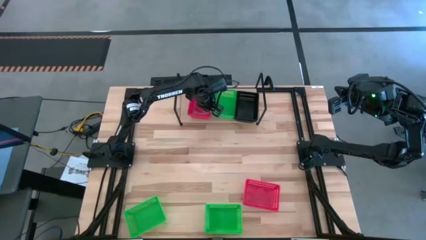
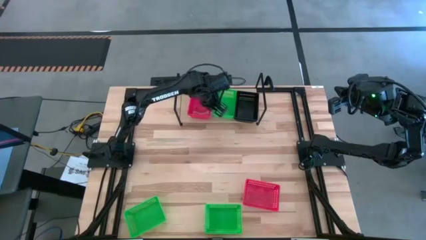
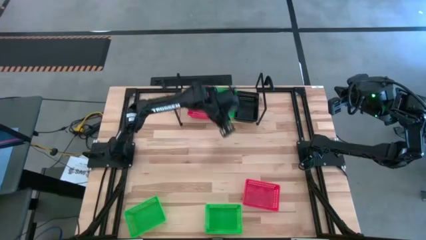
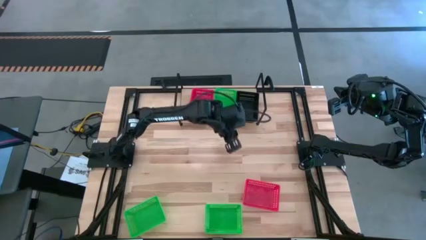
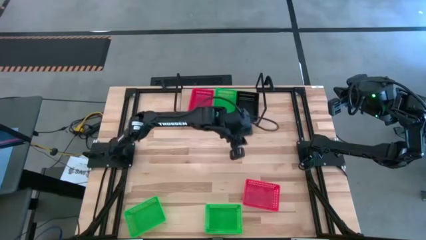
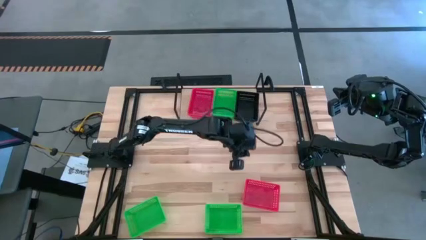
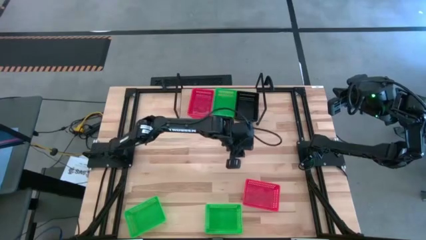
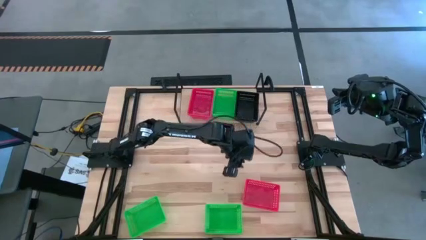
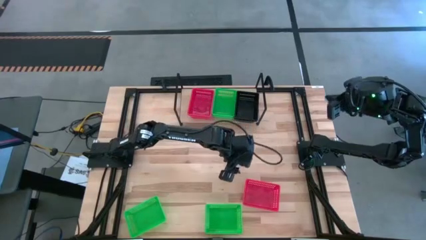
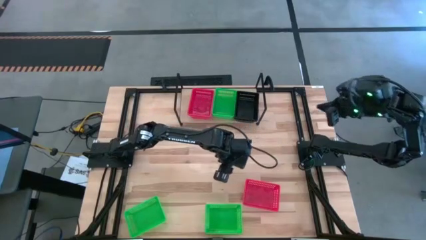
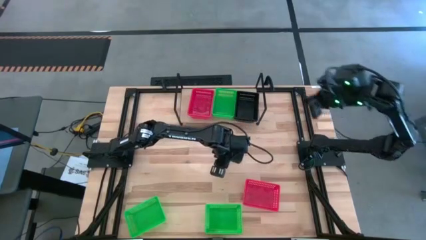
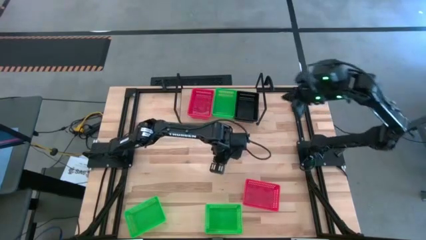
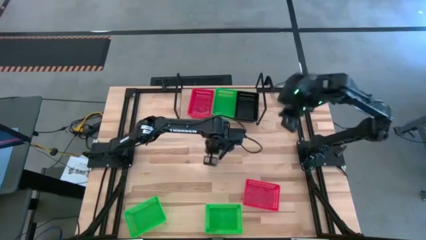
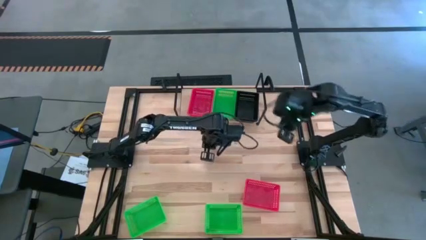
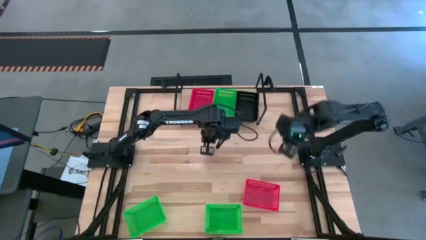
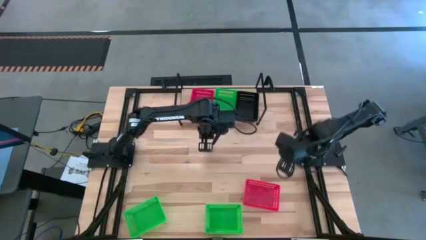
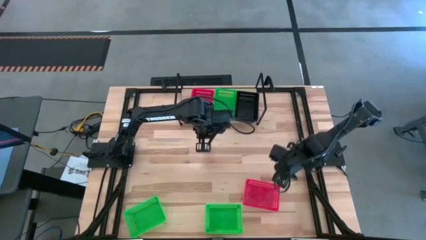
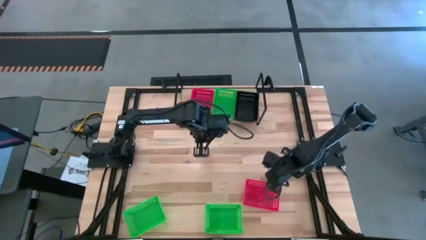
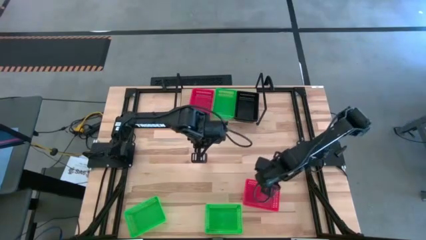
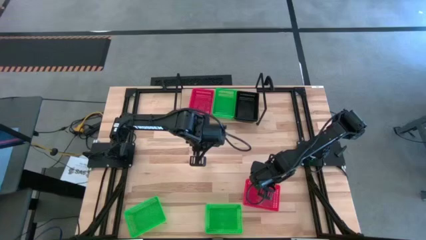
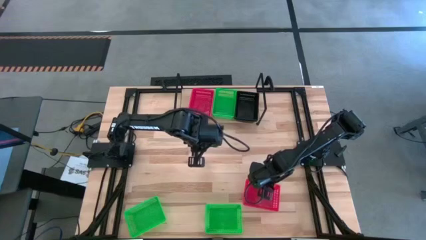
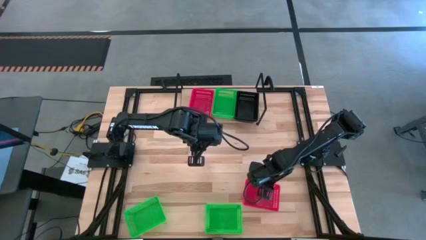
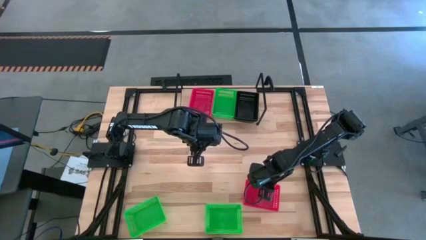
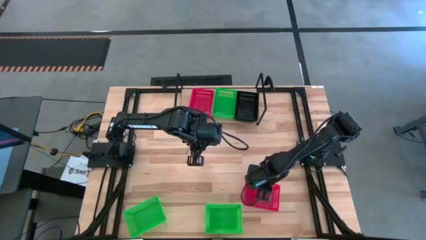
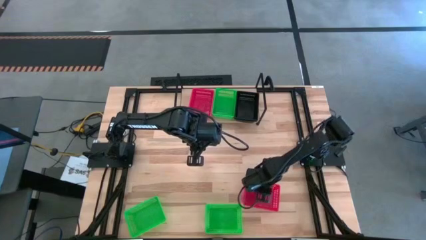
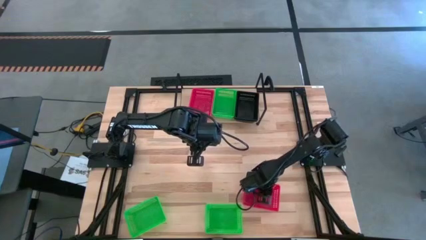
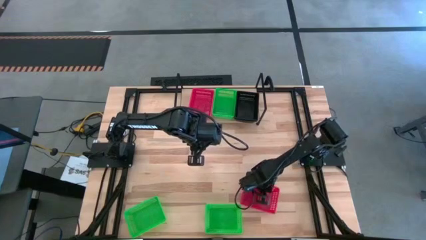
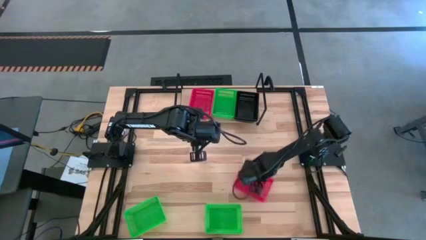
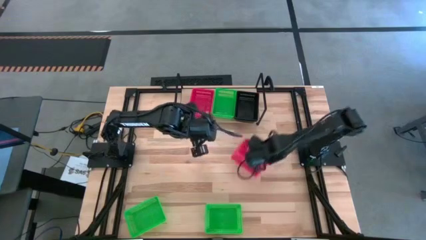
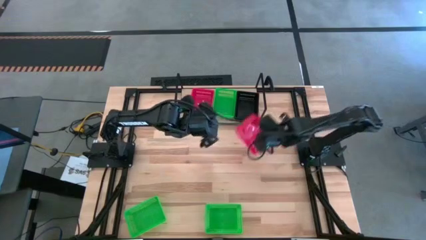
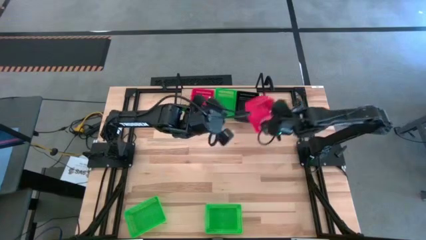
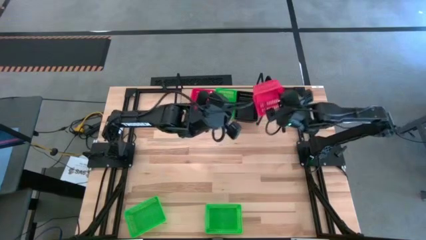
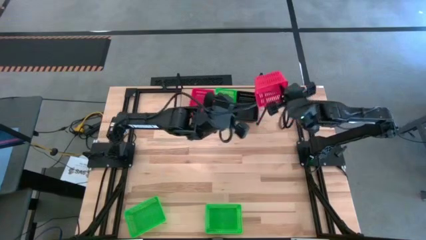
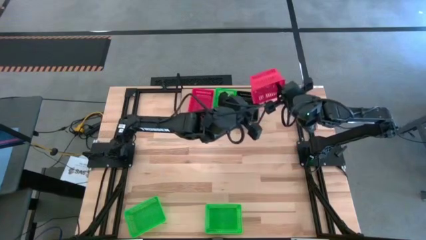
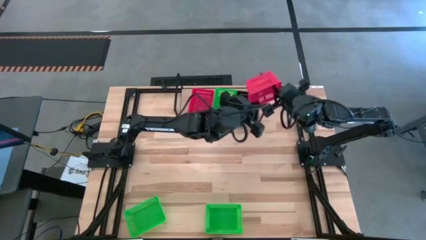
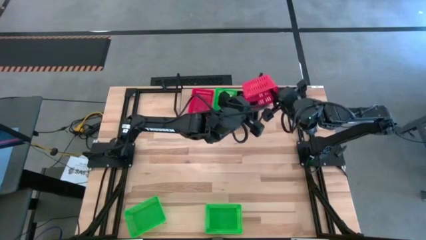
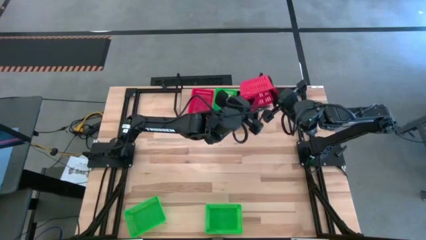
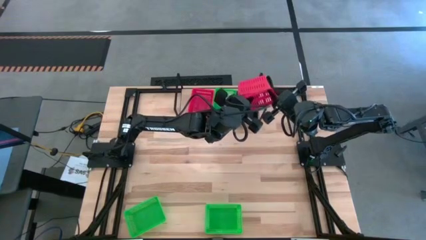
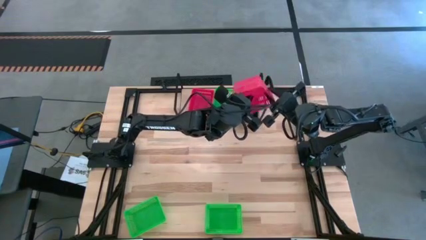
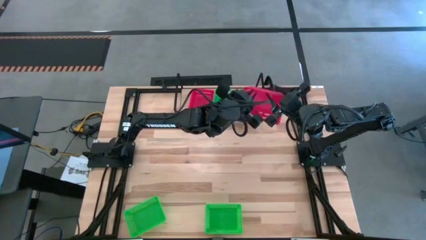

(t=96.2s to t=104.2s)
Task: Stack baskets on shelf by color
Stack the red bin on top of the other red bins on the shelf

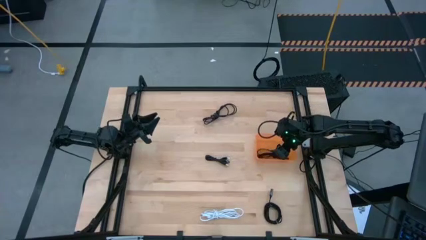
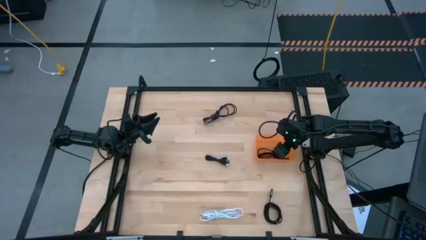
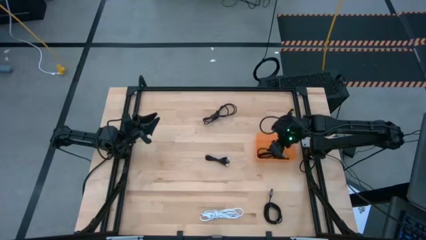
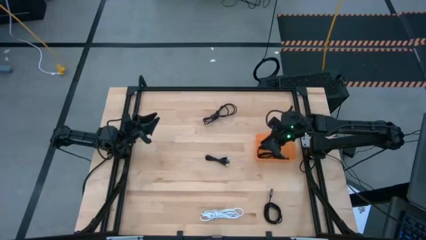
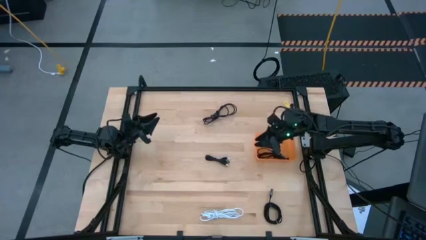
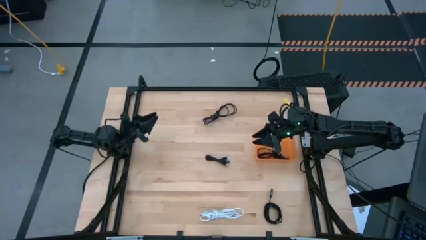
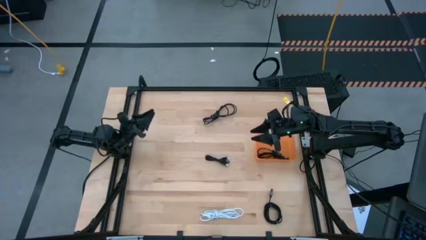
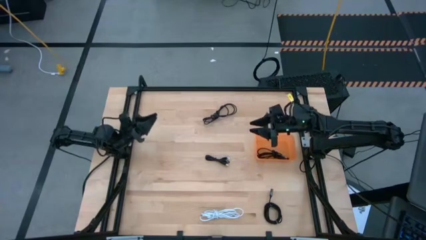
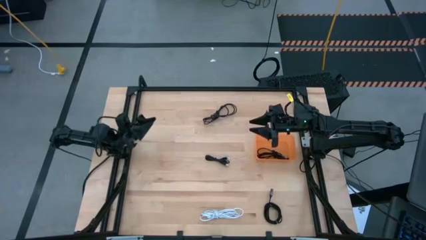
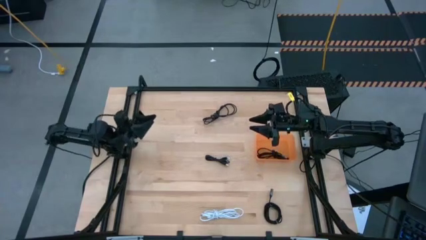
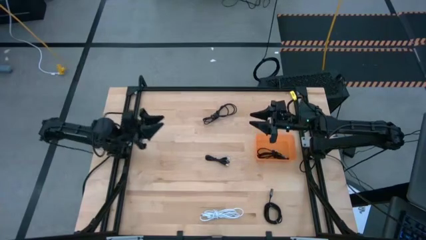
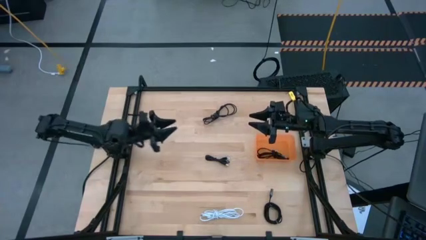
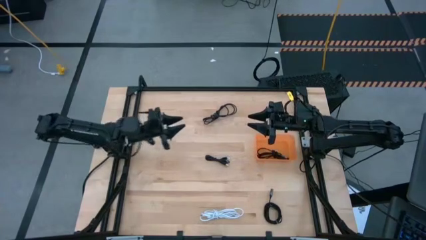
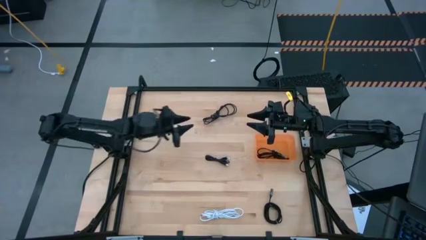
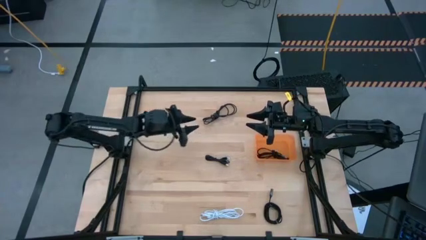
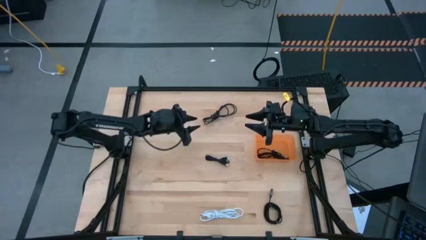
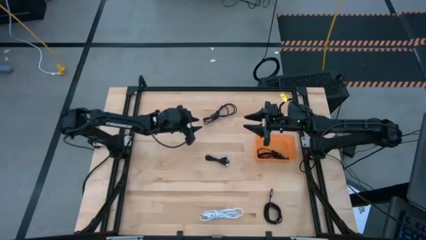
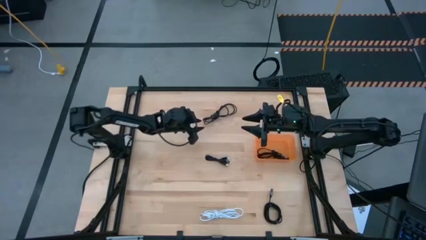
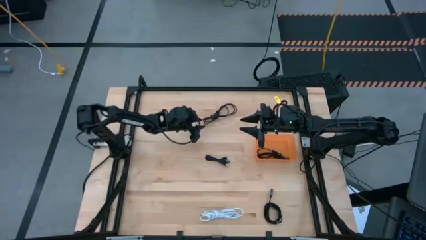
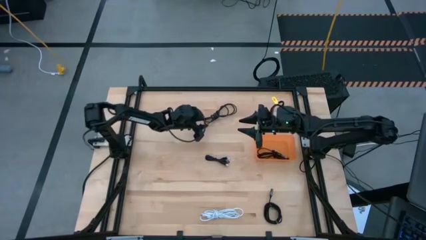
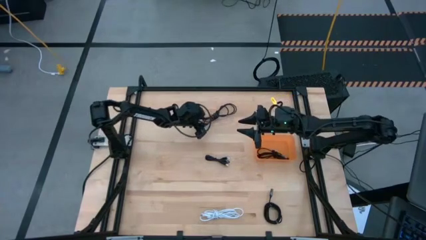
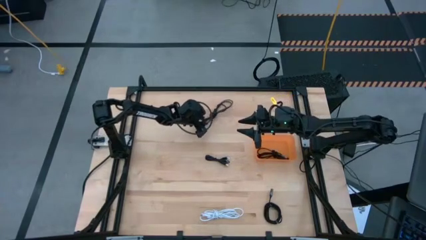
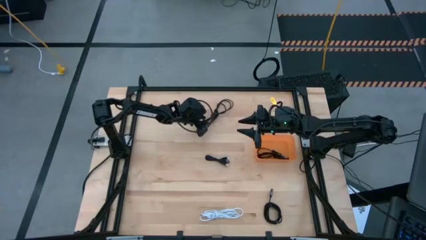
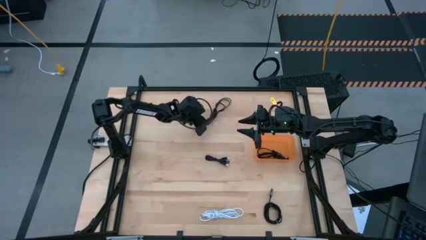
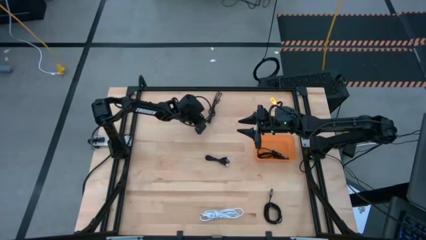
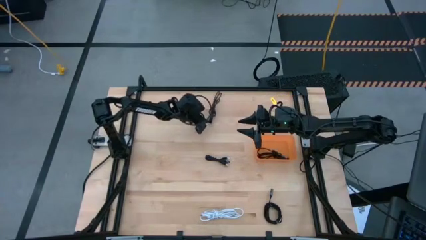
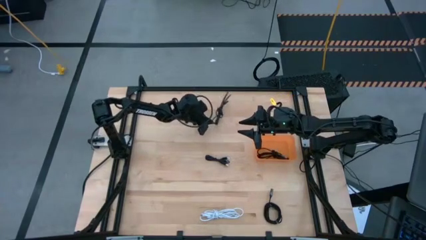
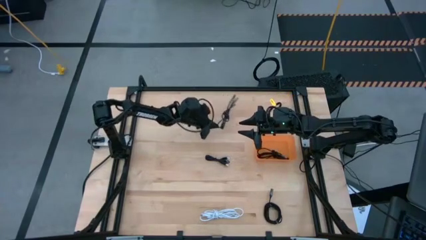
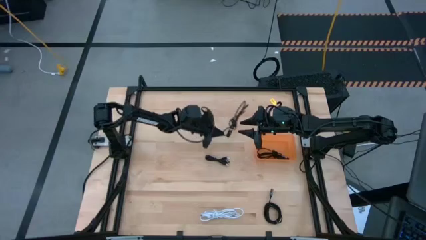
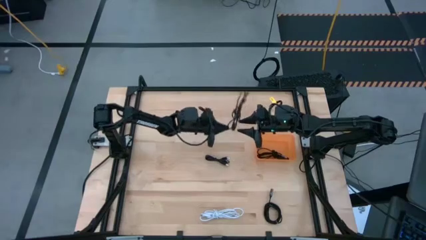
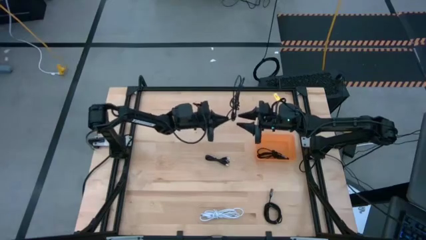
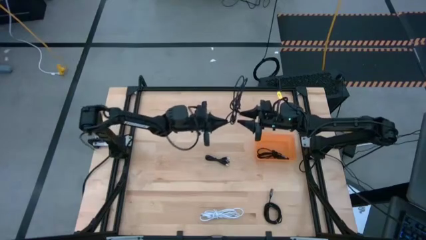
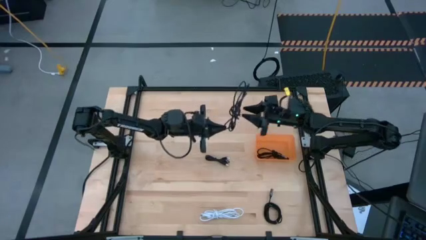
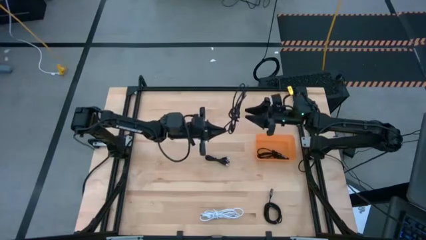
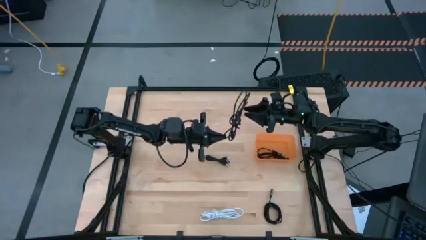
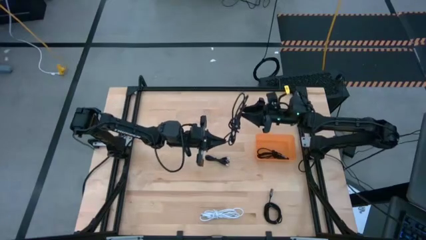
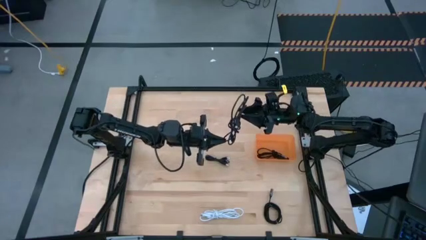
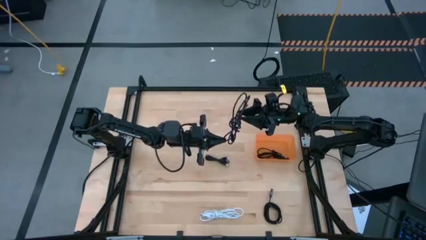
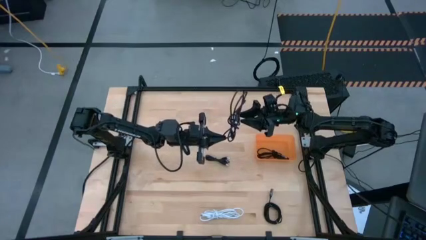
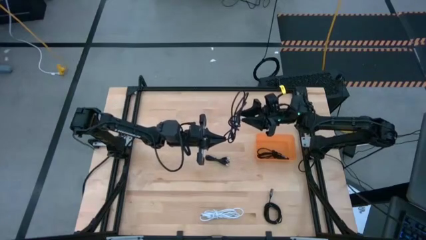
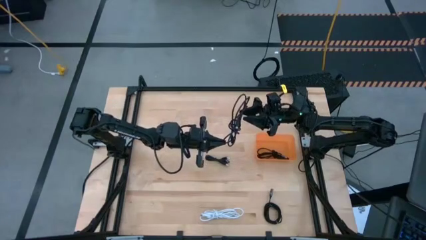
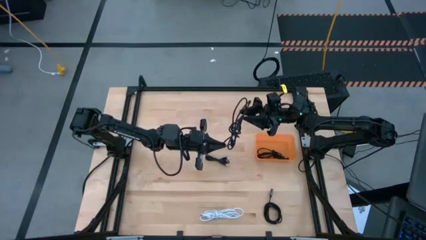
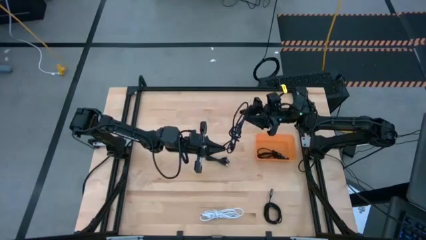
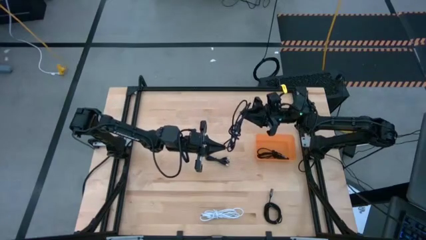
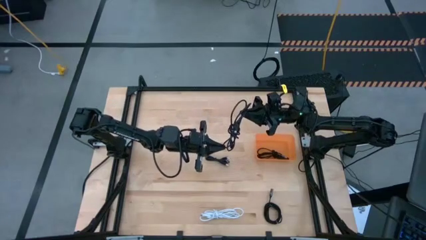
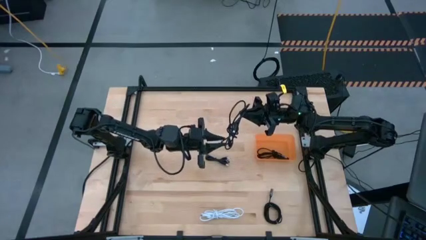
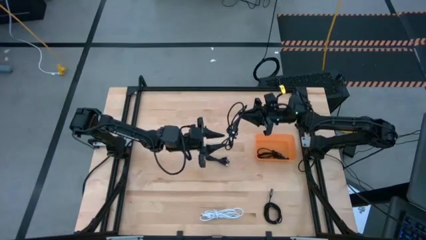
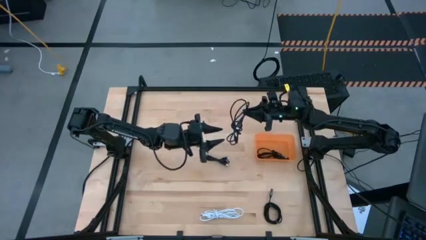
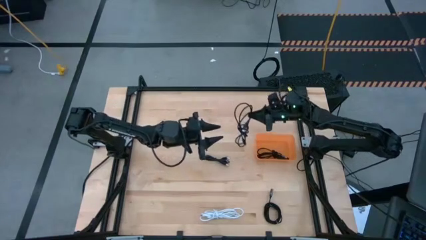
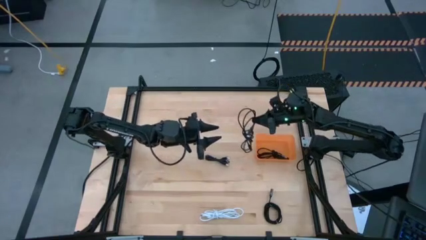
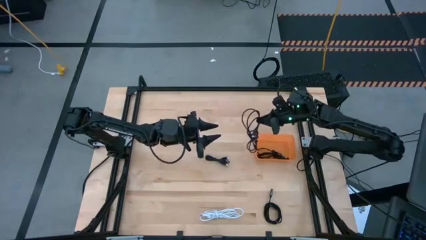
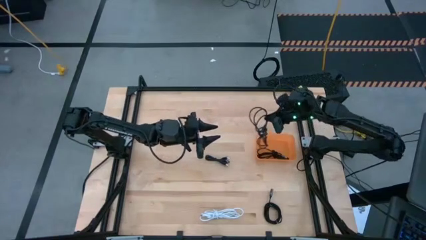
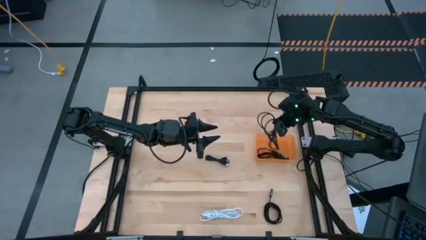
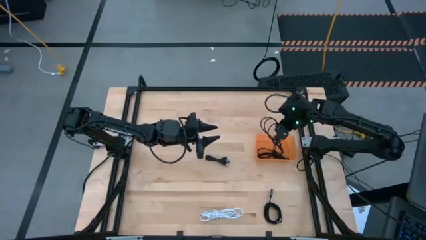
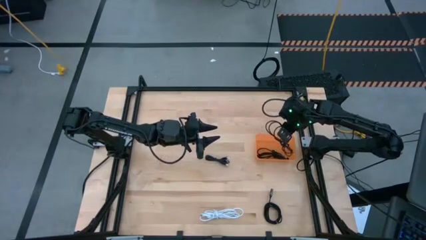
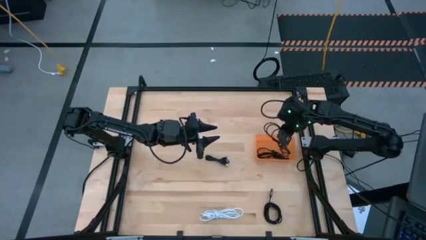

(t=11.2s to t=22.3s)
Task: Pick and place USB-C Cables
Put the black charger cable into the bin
